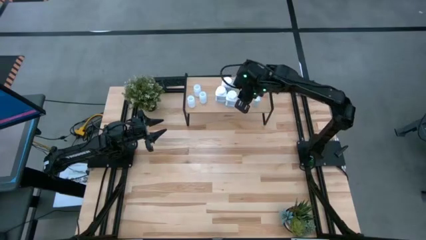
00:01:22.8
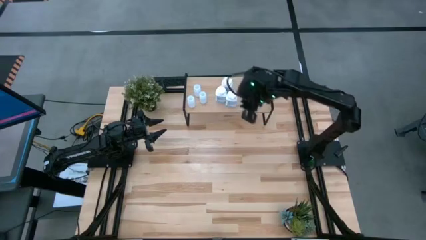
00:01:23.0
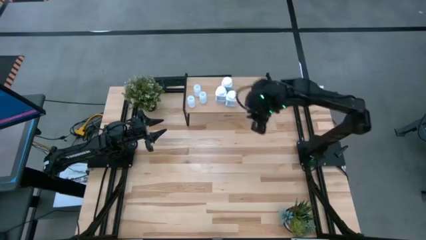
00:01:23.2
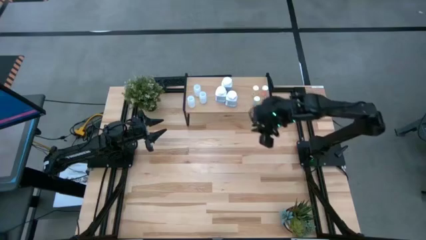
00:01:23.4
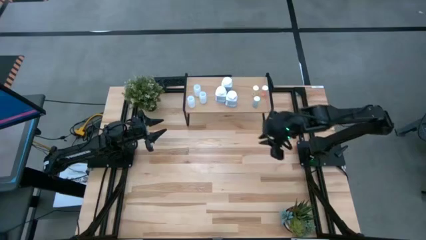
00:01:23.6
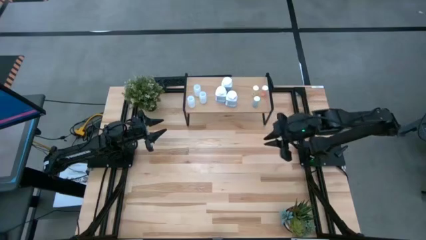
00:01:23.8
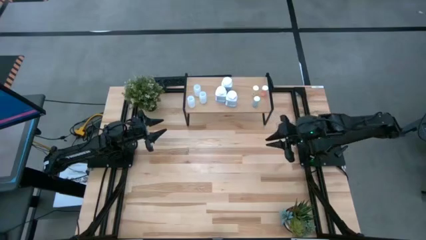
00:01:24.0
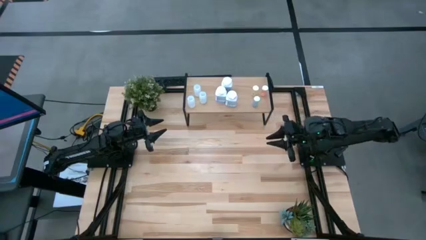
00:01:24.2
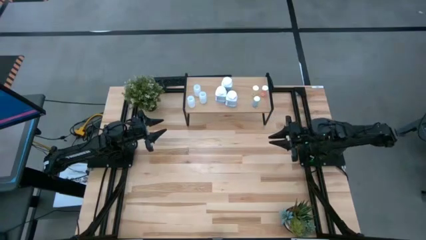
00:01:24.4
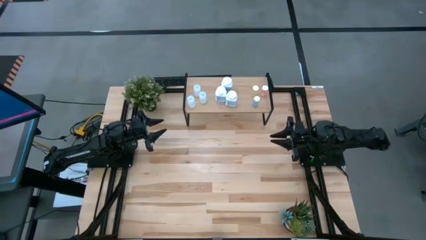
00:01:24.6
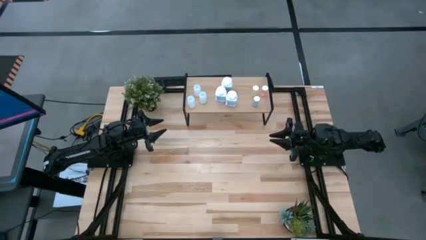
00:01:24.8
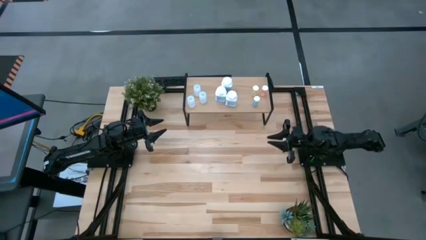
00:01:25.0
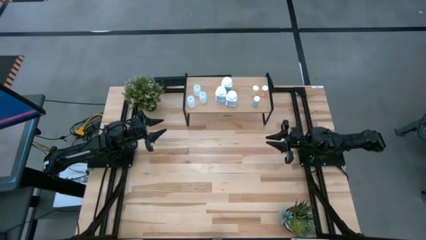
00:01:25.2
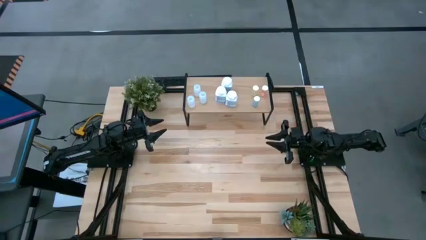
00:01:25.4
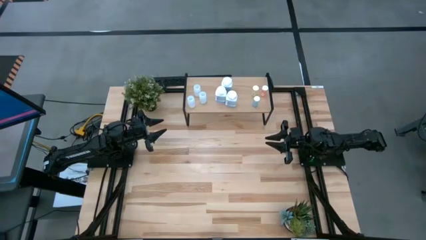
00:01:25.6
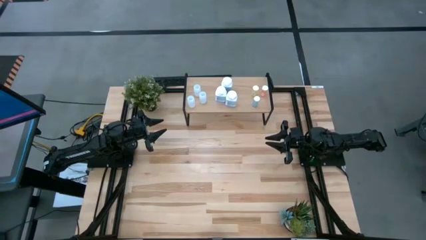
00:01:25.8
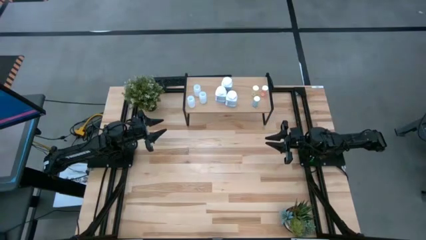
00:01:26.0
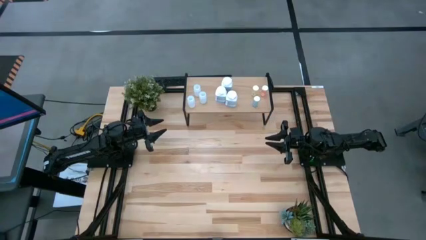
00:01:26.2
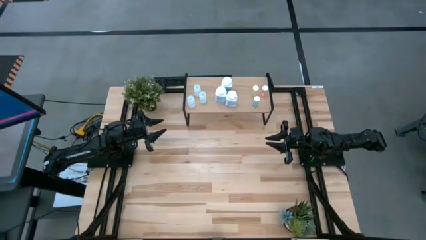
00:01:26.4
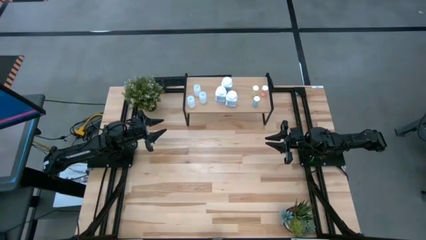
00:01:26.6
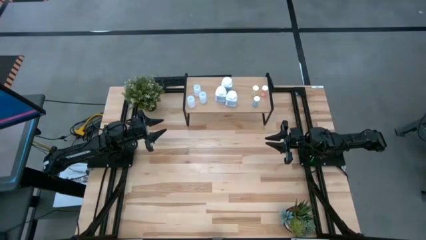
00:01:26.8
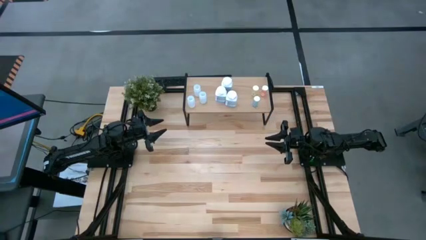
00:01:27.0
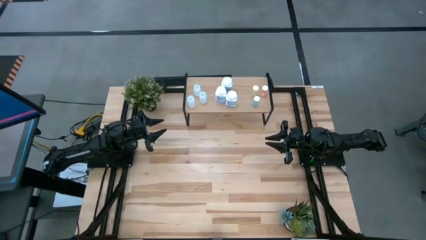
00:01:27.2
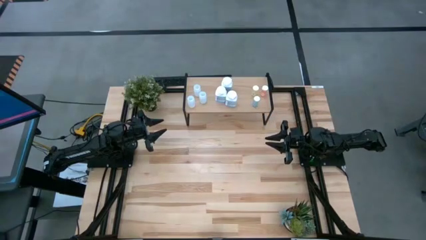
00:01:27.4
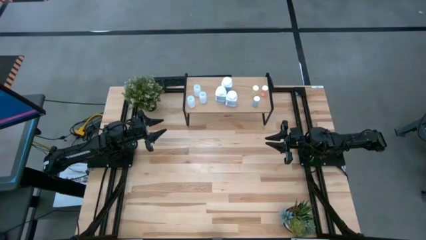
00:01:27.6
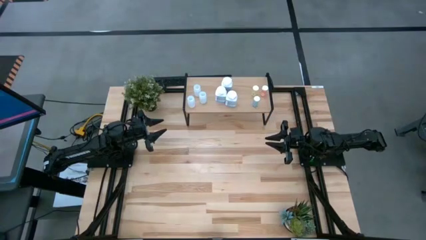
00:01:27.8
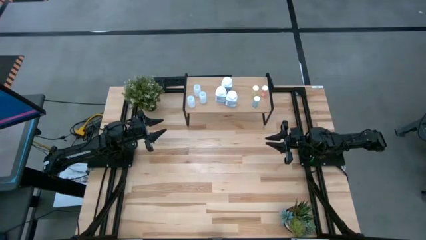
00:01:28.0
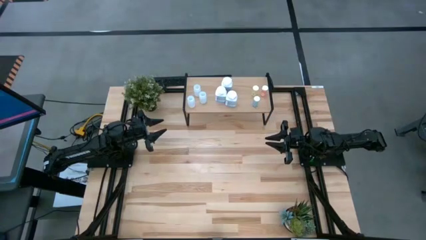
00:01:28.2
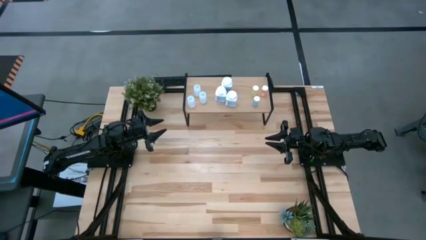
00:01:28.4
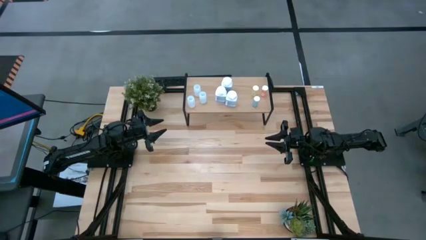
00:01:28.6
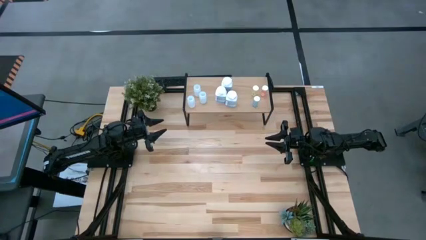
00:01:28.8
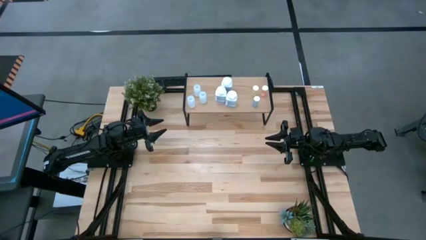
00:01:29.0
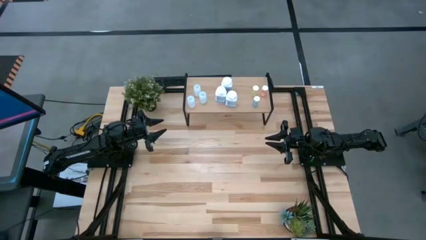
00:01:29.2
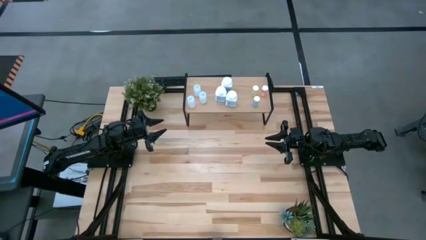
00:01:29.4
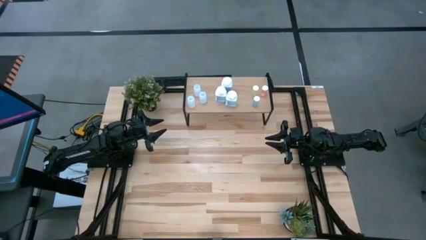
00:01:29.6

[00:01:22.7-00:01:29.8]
Task: Pick and place medicine bottles onto shelf by color
Return to Home Position
